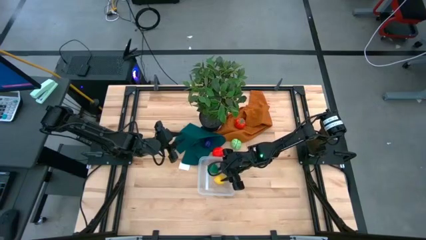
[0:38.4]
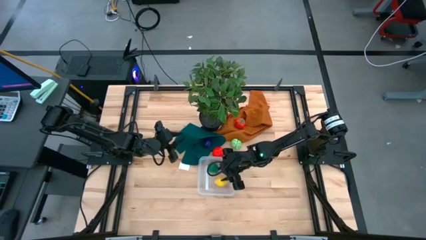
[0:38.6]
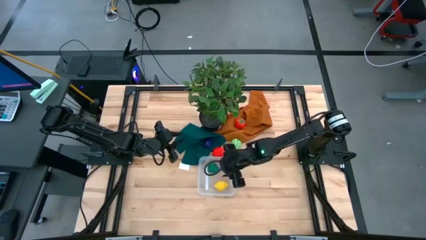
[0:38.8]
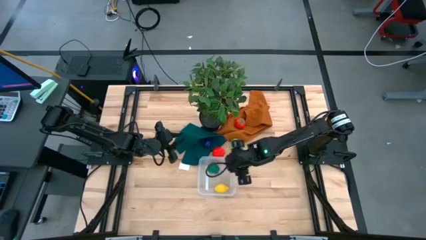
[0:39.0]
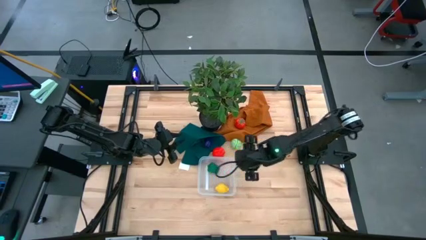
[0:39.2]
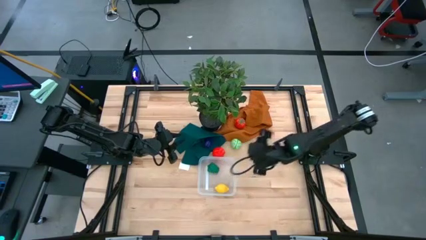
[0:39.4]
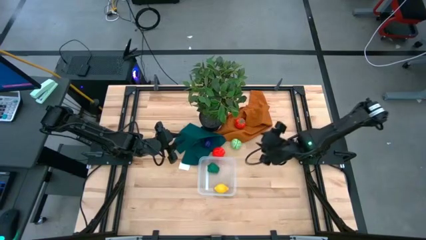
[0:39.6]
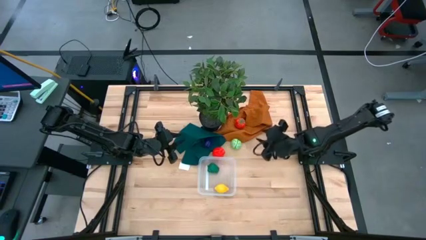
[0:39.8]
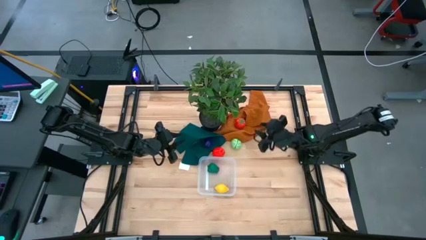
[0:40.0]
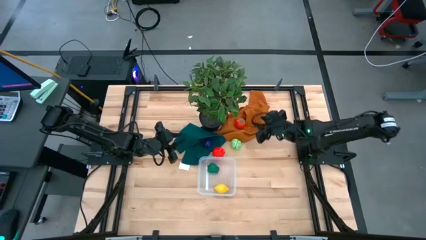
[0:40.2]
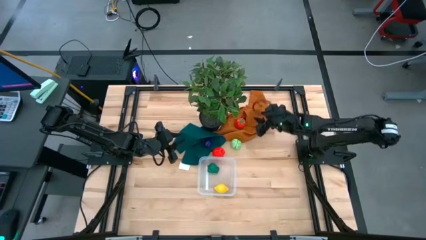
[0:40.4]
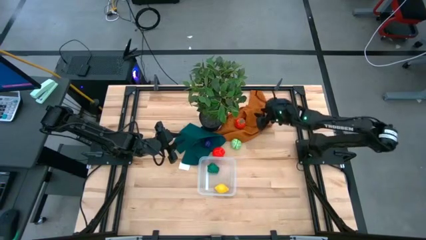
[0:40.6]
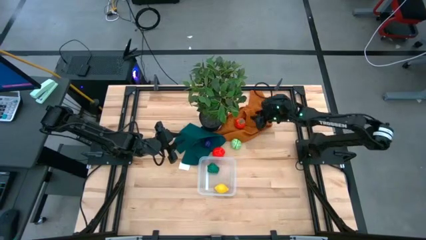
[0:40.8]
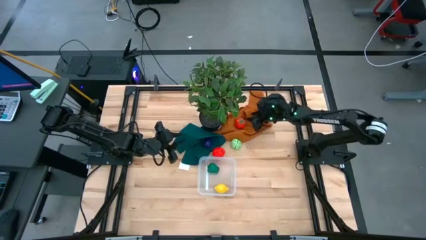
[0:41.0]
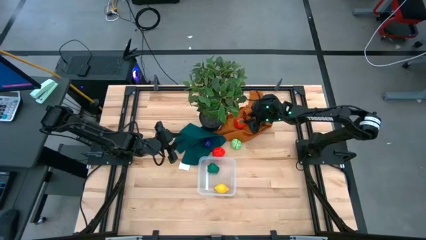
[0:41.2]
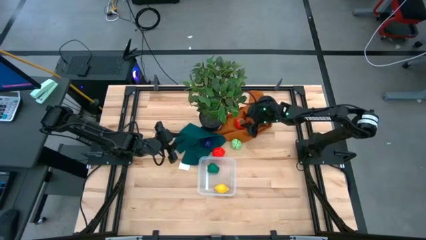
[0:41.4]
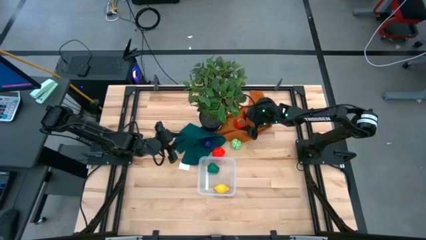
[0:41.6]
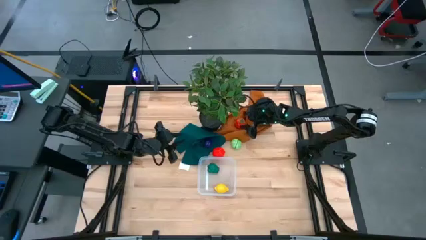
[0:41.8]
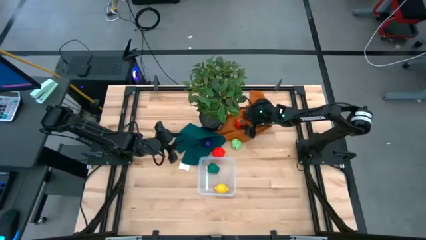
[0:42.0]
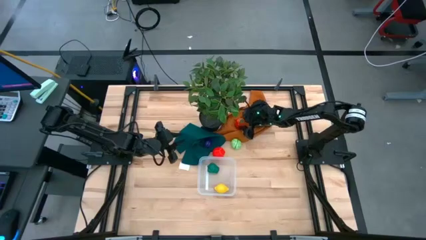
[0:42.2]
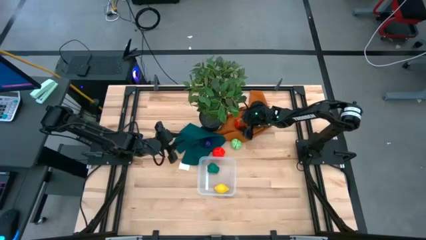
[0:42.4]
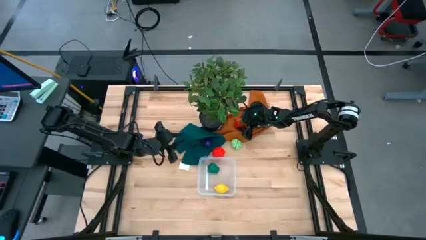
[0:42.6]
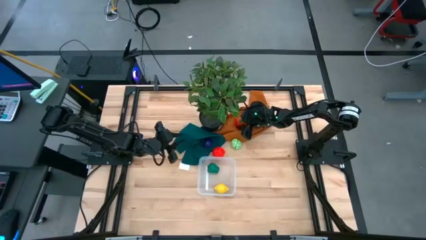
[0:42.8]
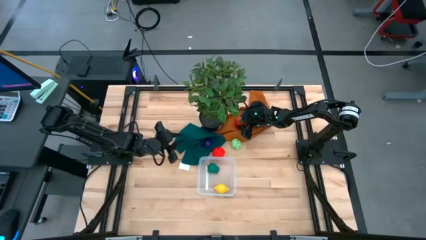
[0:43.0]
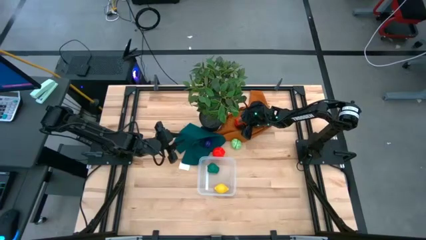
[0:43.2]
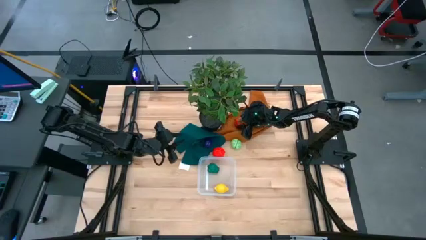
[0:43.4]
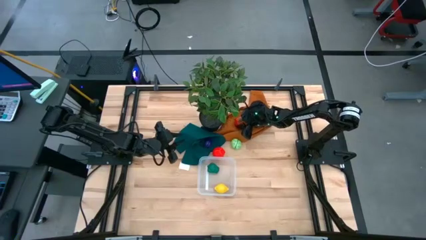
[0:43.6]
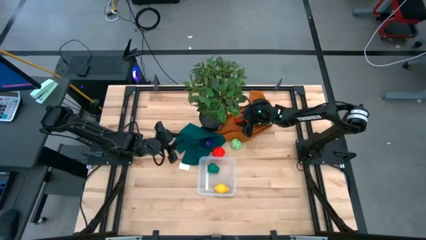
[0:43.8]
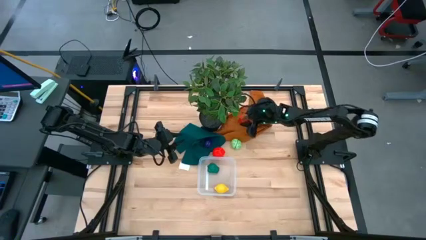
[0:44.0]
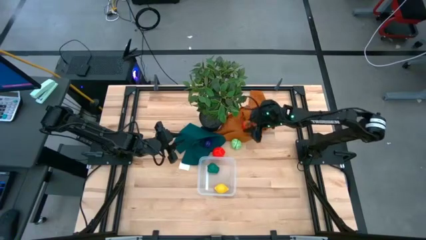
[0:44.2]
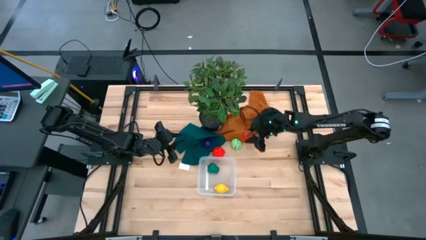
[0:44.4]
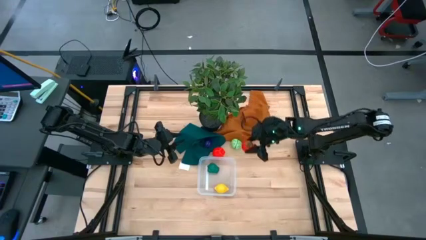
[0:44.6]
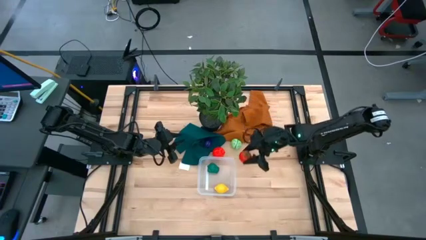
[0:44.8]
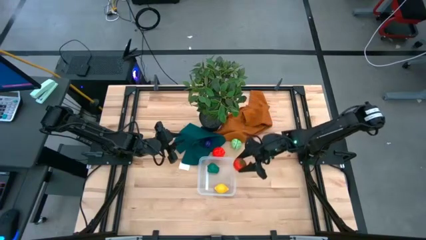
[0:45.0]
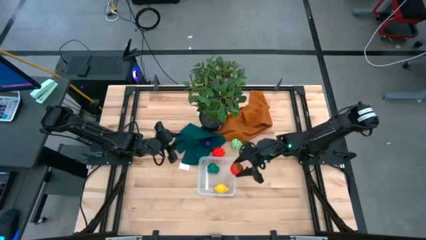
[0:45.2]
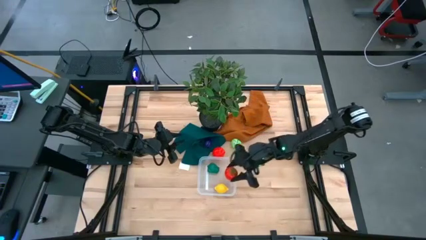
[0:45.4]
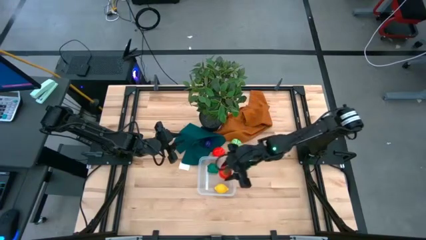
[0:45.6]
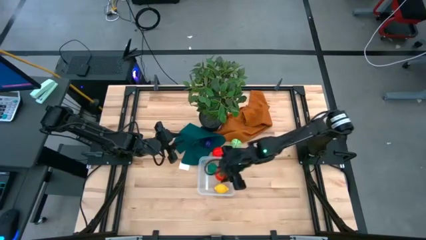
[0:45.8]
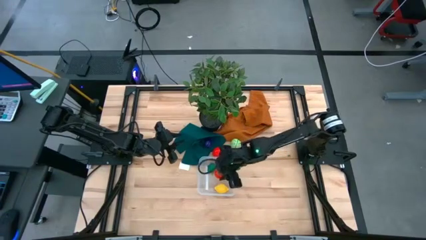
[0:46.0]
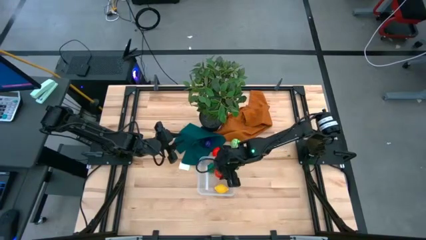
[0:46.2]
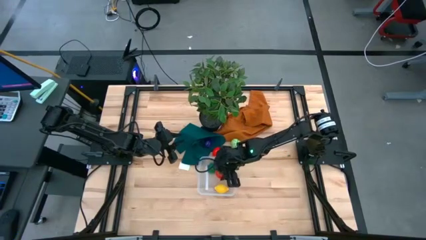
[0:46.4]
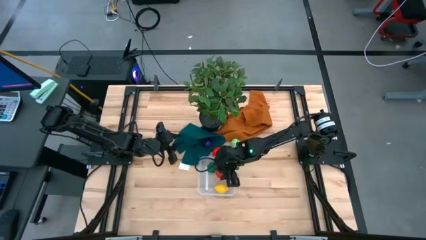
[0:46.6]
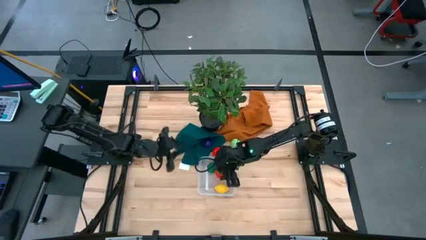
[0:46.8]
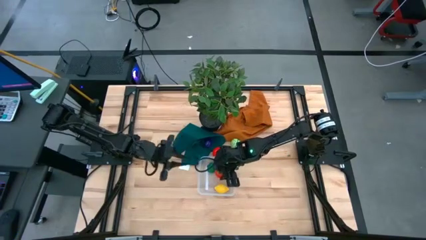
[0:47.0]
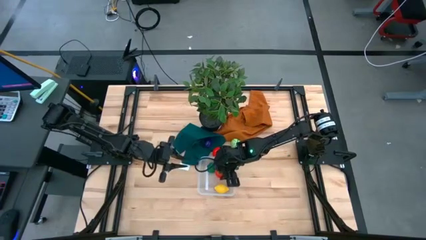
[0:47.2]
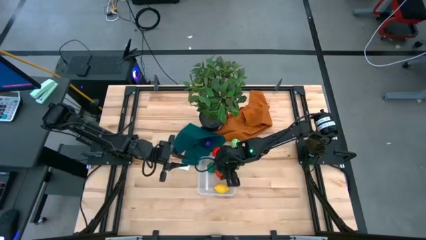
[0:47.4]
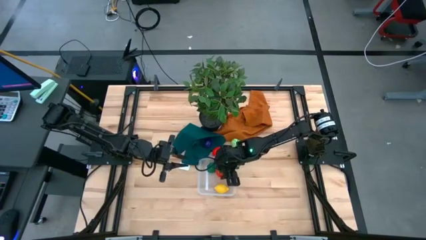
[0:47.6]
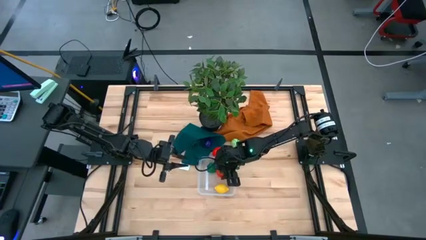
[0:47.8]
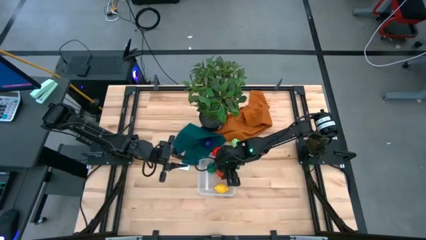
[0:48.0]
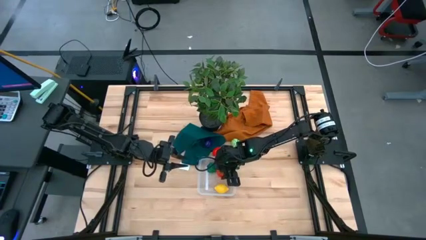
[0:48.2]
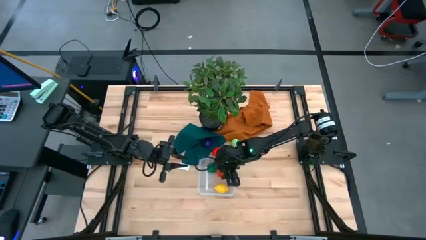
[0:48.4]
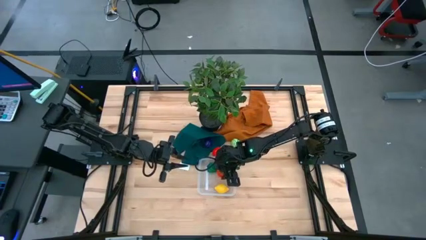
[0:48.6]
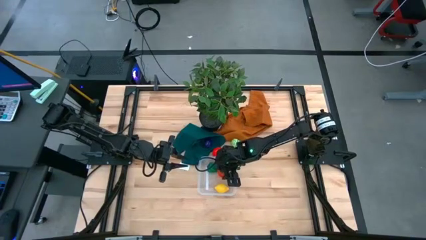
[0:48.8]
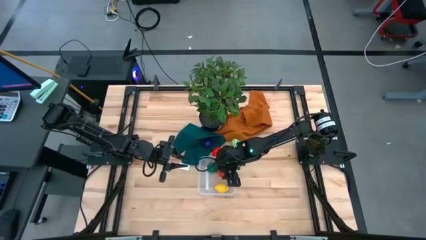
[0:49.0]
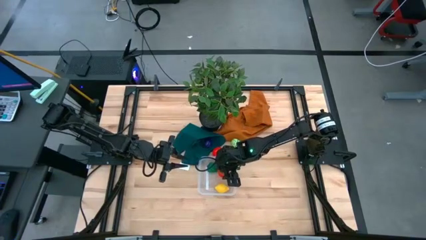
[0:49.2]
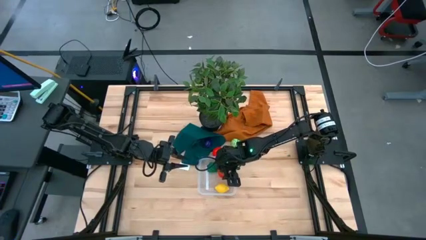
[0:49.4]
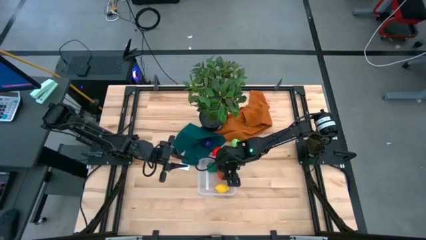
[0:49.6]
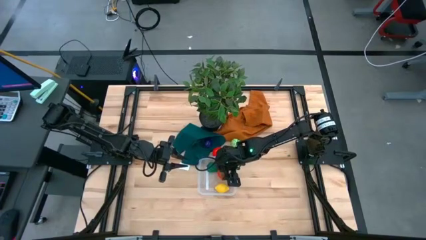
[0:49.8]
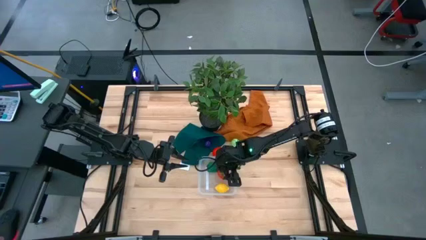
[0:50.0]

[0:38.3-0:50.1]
Task: Pick and placing Produce into tupperware
Put the tomato into the transparent bin
